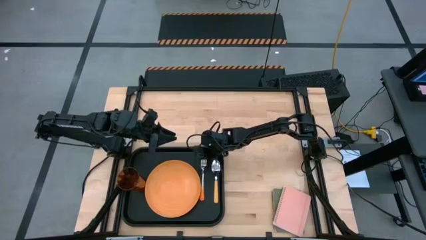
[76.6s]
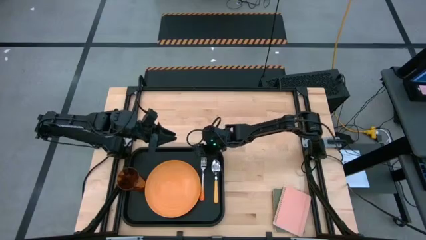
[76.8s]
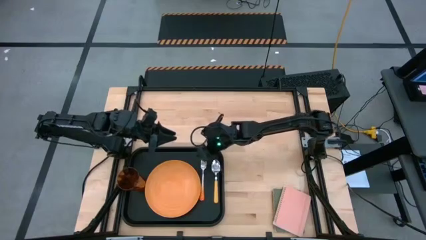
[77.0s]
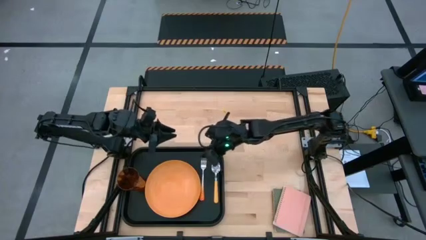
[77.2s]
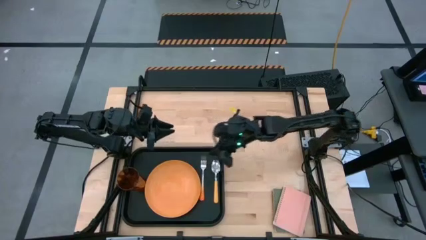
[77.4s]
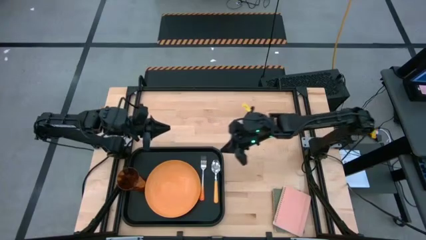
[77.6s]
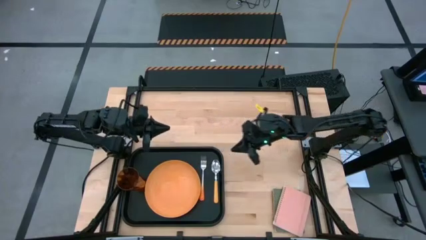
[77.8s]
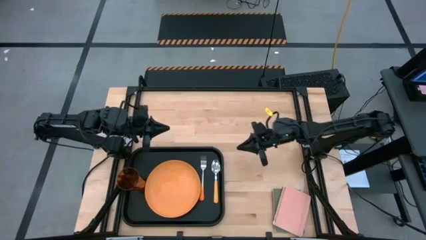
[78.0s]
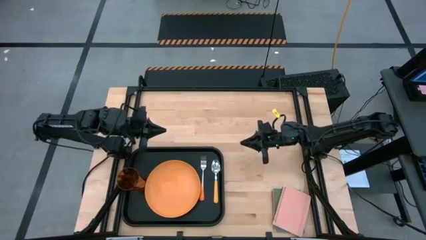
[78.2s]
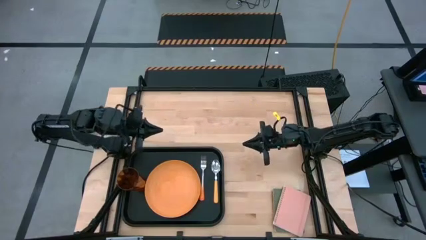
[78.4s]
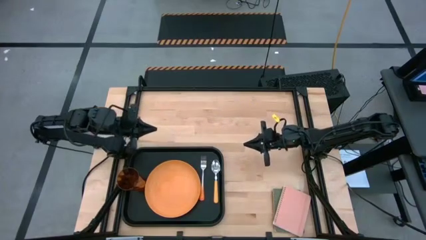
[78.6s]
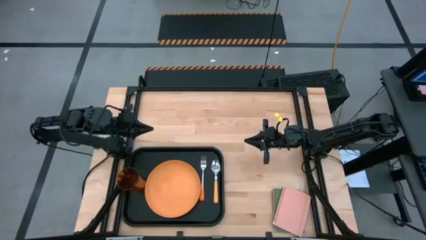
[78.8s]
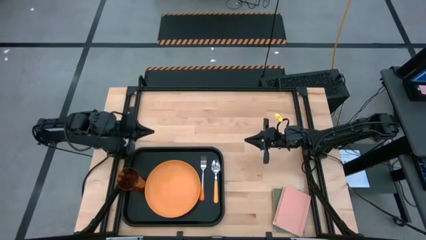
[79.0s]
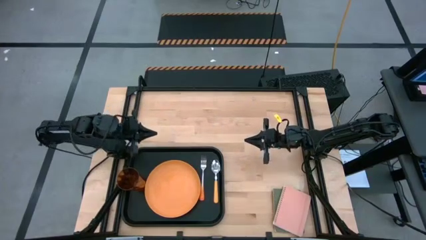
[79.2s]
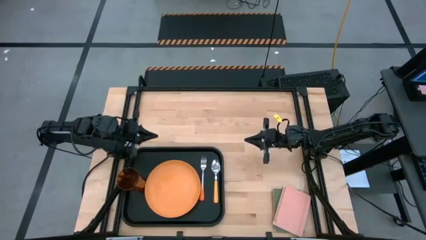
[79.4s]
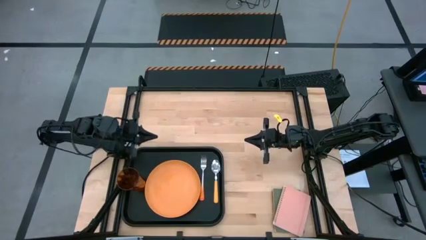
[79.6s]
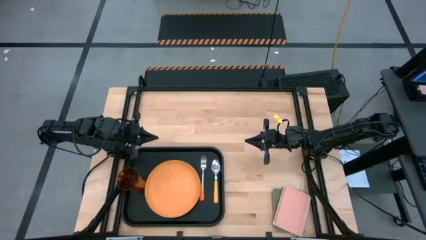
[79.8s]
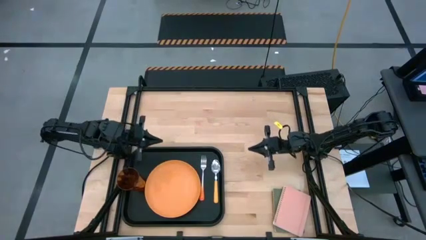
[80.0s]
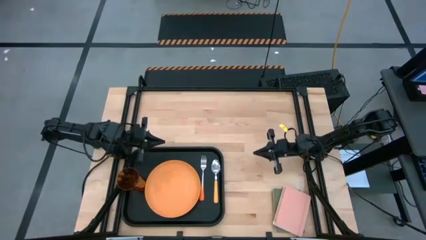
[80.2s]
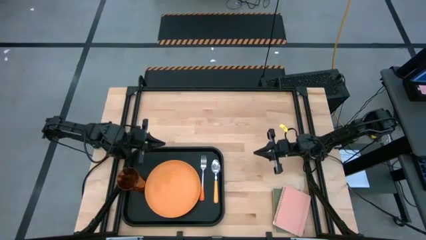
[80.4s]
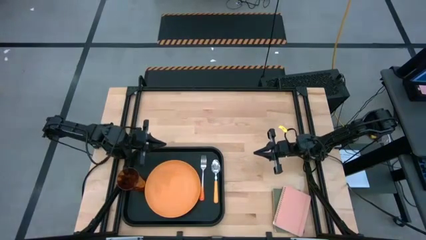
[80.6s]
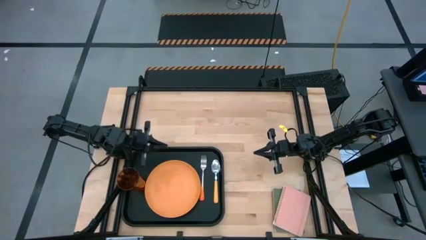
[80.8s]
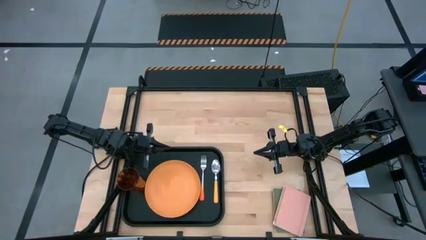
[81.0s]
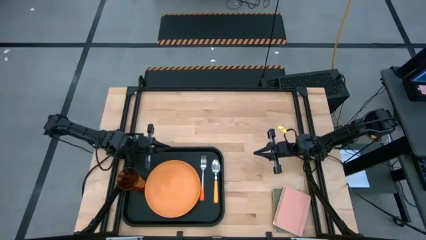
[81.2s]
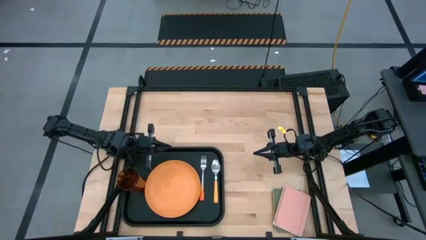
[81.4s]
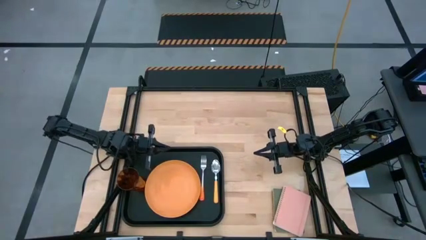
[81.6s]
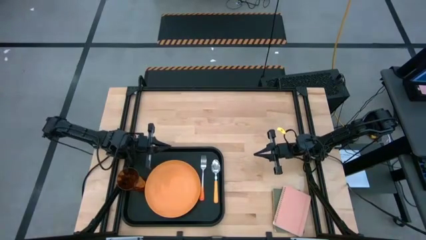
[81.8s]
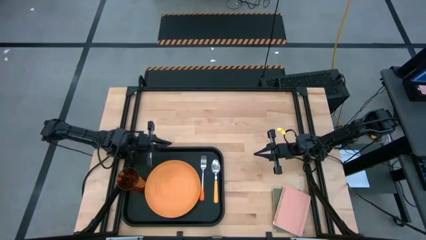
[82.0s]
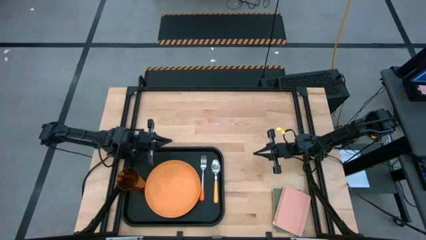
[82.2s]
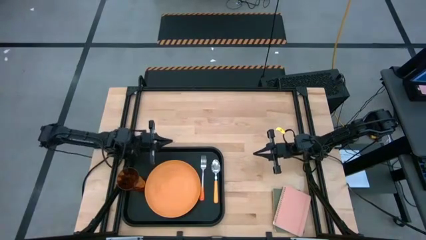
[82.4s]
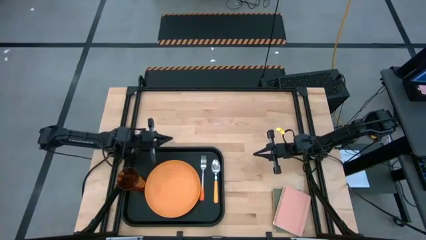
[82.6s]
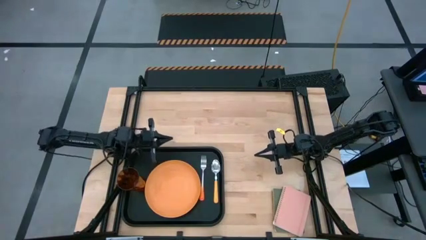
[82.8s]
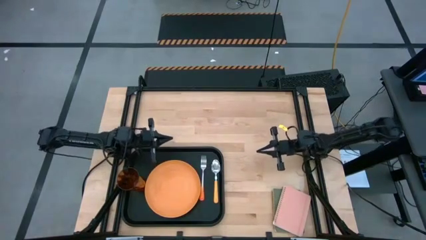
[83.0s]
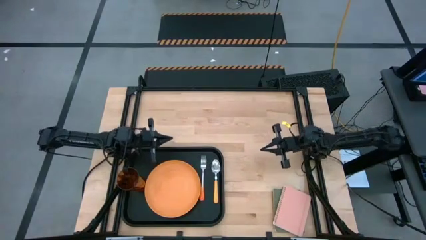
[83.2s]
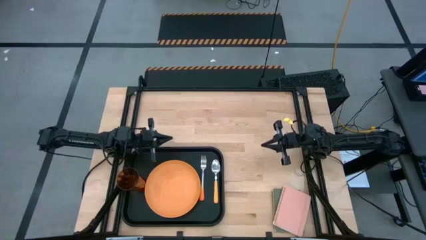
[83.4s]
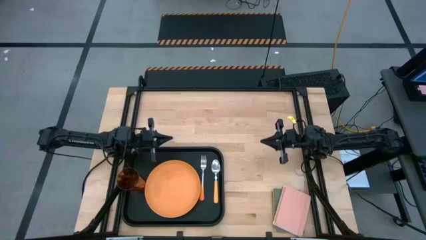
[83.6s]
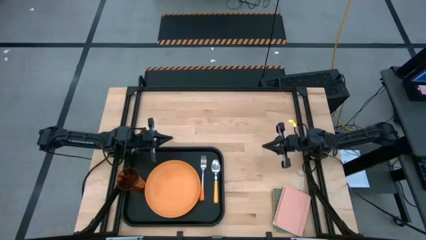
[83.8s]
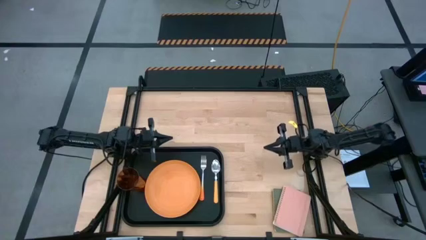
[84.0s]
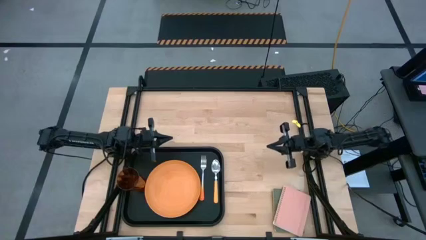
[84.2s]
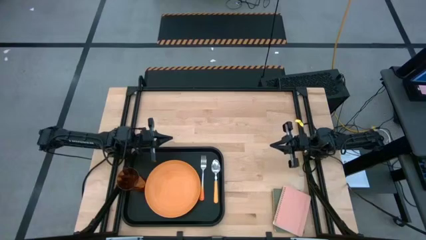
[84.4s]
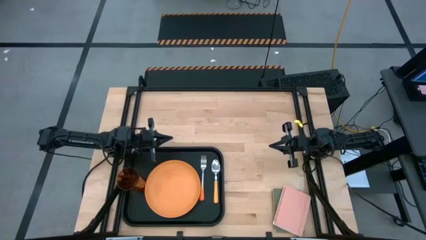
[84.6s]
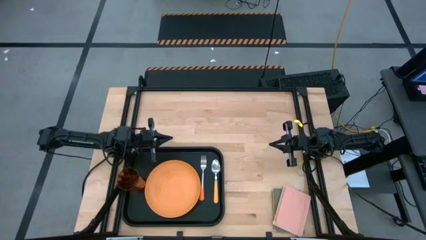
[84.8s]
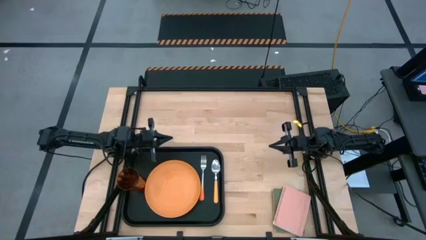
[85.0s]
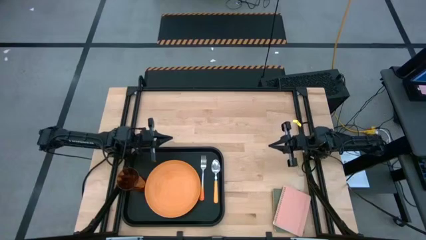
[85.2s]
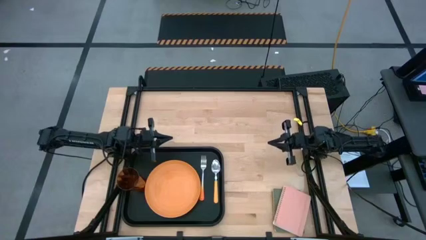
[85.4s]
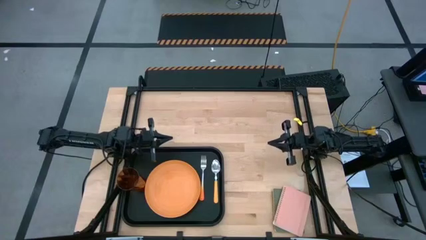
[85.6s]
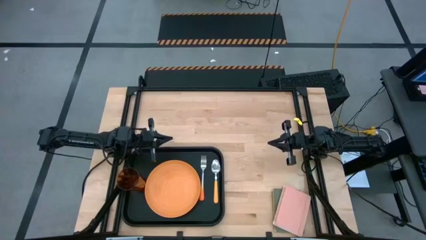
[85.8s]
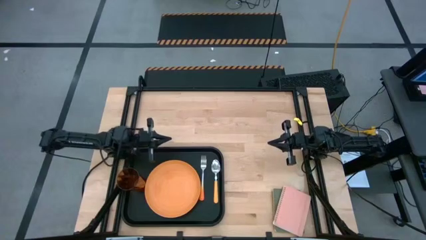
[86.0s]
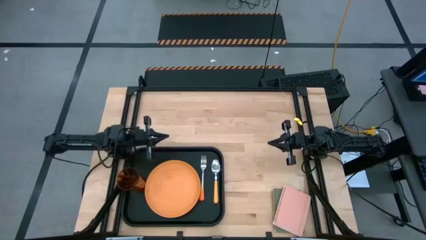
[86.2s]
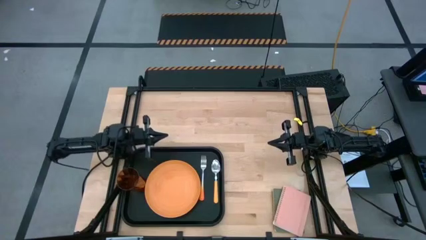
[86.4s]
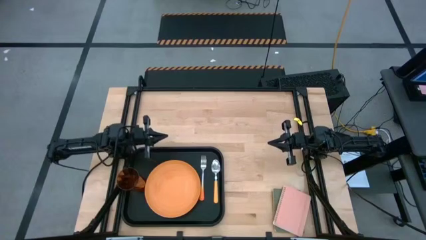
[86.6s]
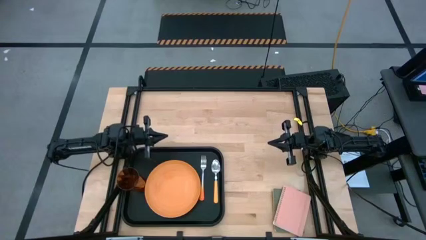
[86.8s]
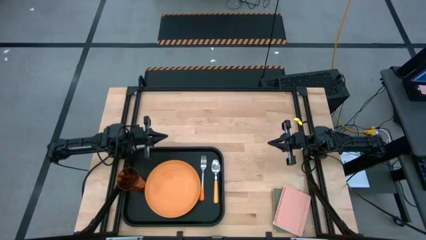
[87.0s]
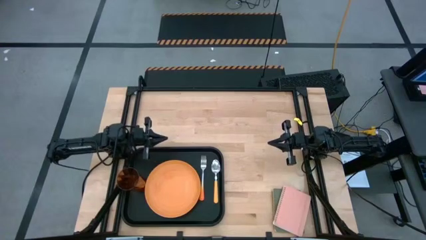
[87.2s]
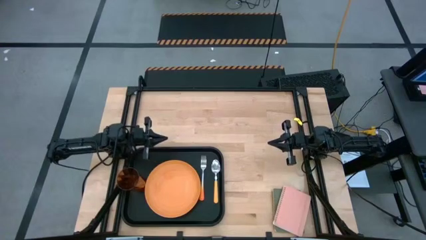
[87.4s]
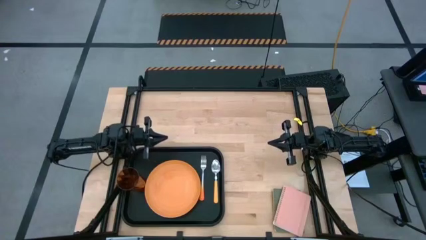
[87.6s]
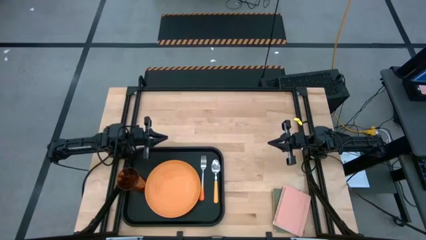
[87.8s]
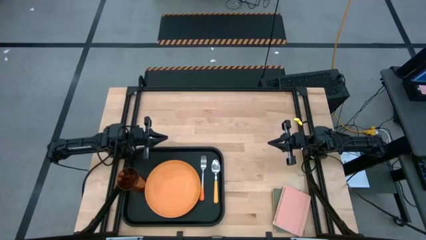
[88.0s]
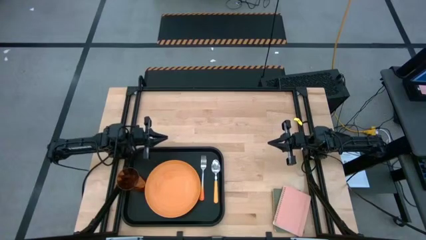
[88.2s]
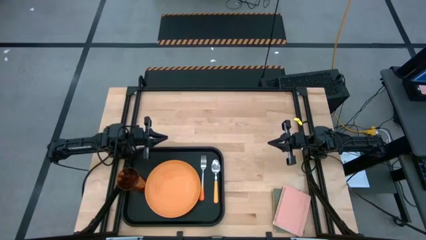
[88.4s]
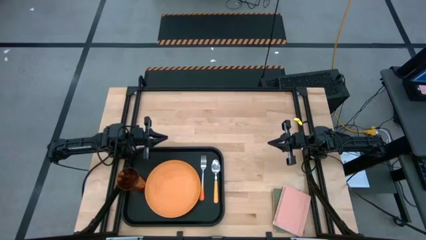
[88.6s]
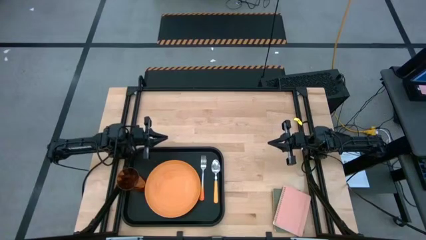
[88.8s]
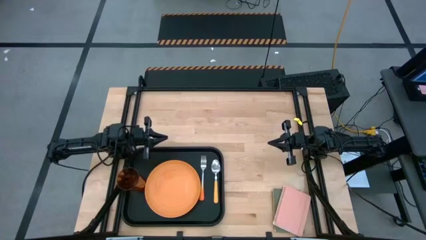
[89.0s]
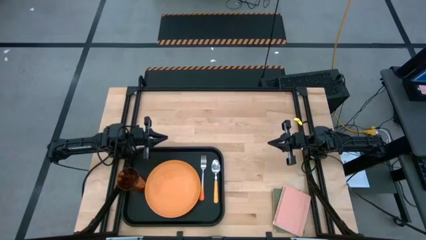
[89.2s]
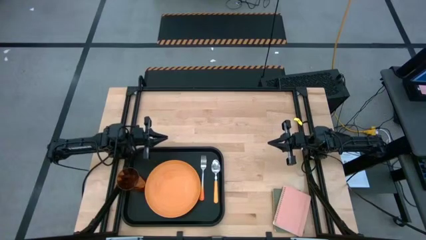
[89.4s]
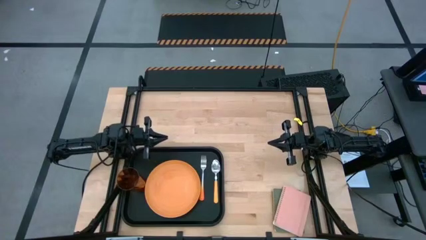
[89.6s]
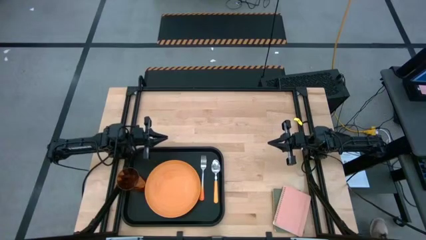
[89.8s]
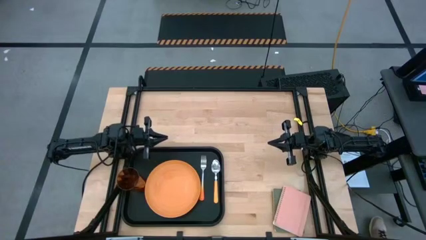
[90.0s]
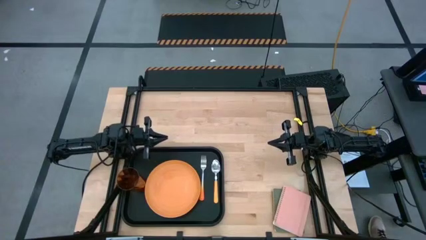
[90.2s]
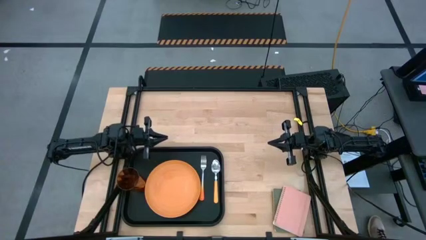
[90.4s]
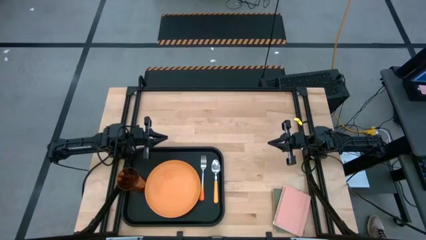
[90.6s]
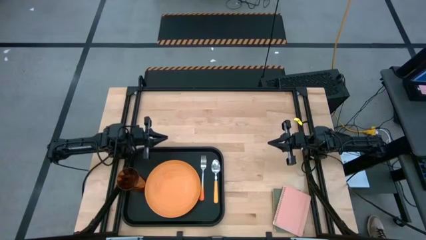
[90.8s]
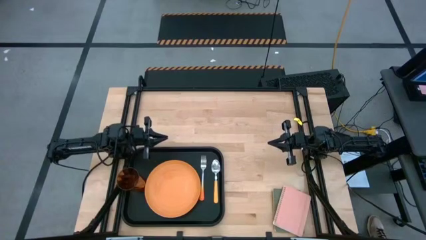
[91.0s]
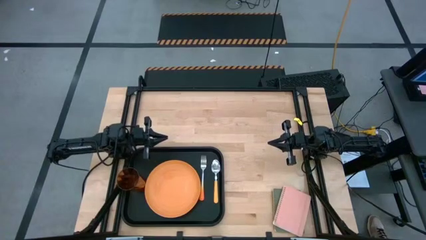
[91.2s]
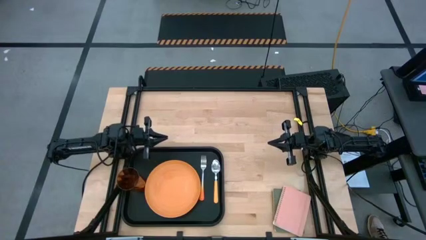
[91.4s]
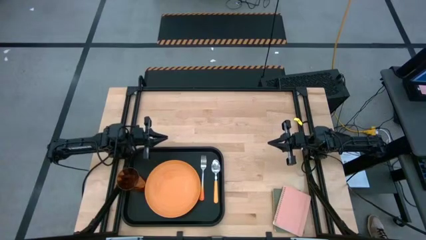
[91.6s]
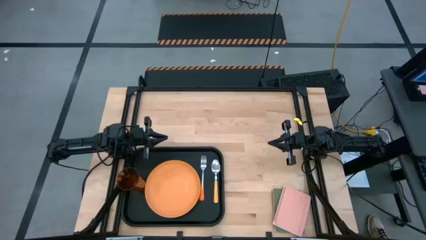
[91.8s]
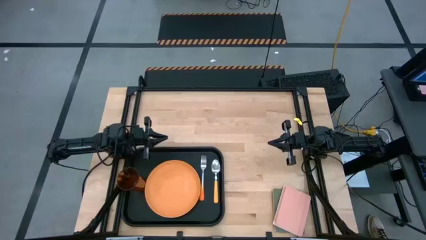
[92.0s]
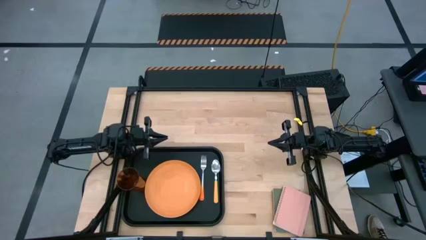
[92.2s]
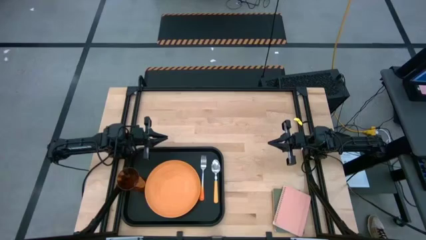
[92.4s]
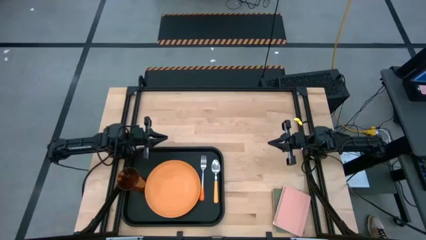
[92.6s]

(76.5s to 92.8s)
Task: Pick and place plate/cup/fork/spoon on tray
Return to Home Position
